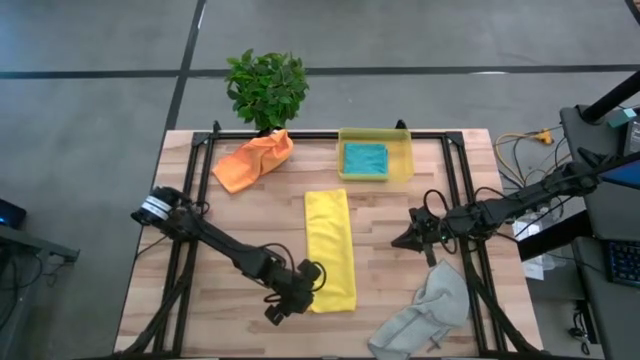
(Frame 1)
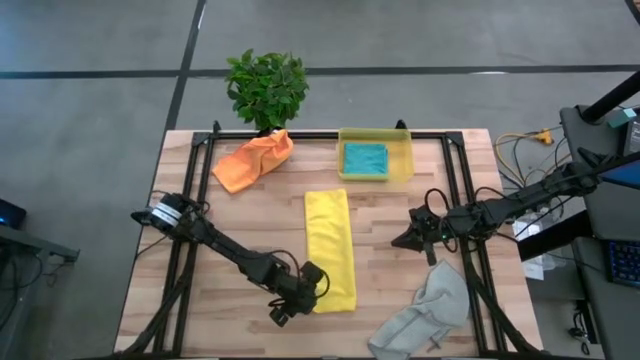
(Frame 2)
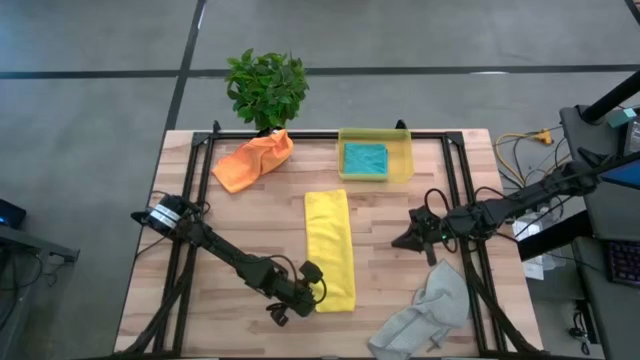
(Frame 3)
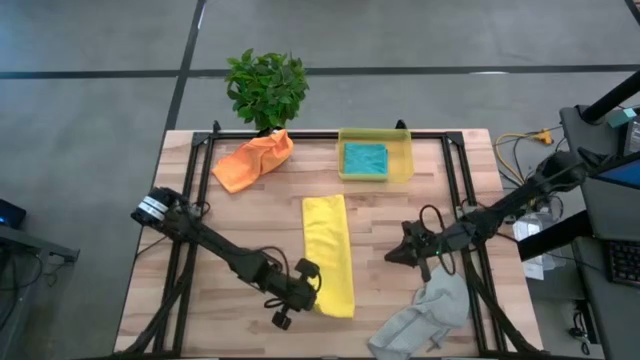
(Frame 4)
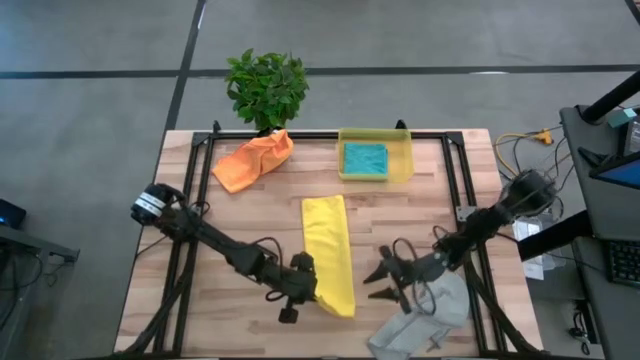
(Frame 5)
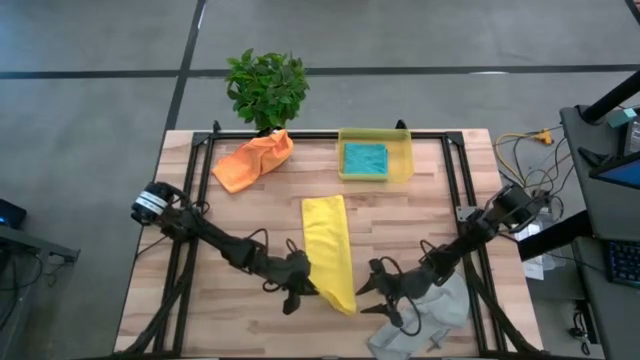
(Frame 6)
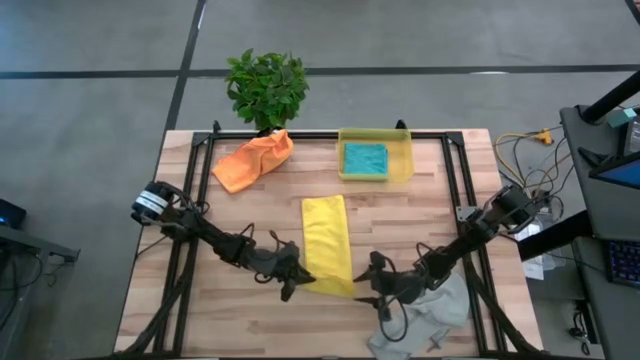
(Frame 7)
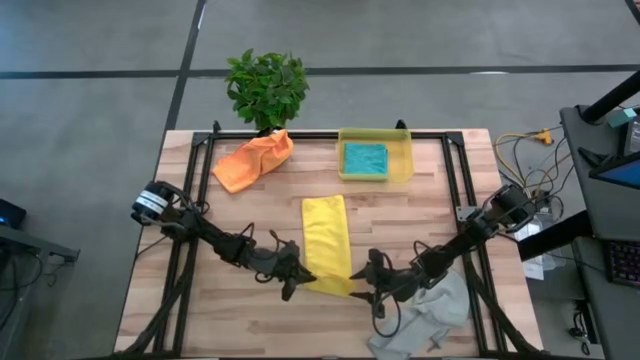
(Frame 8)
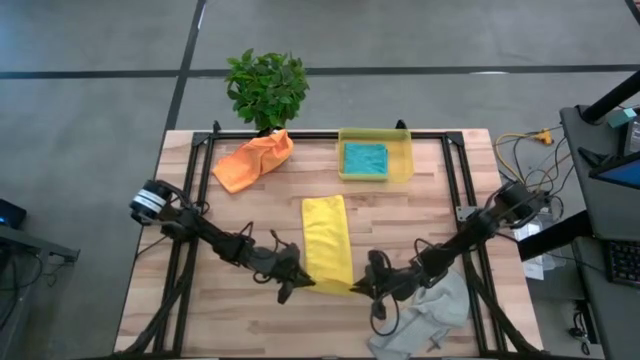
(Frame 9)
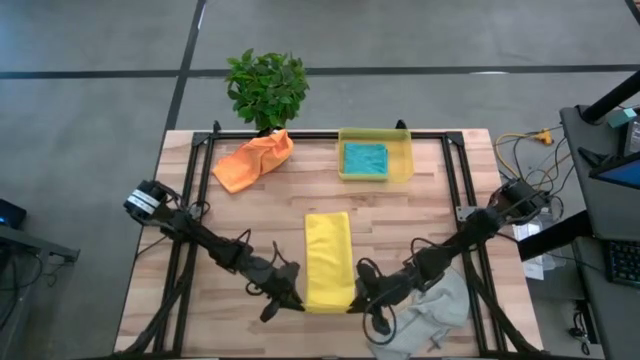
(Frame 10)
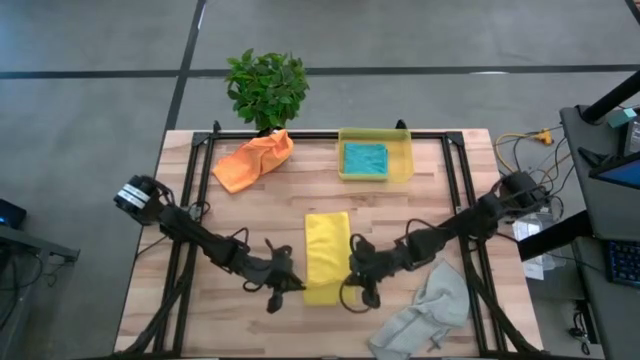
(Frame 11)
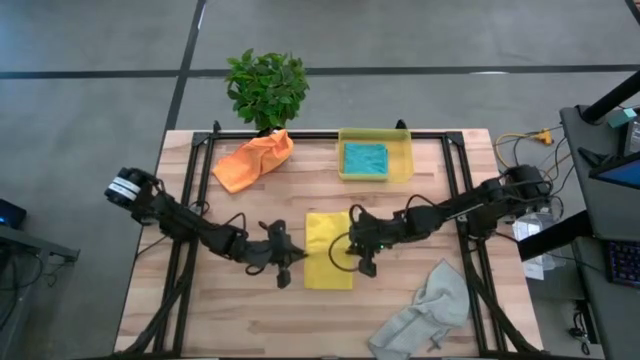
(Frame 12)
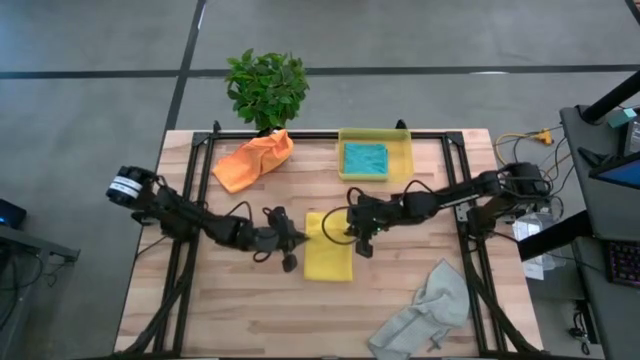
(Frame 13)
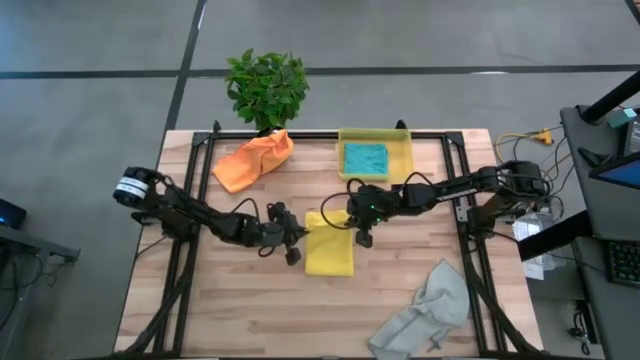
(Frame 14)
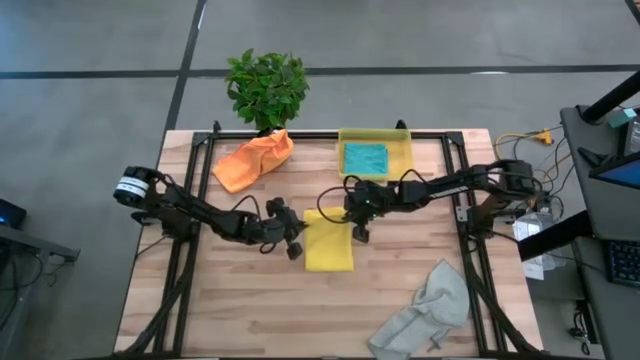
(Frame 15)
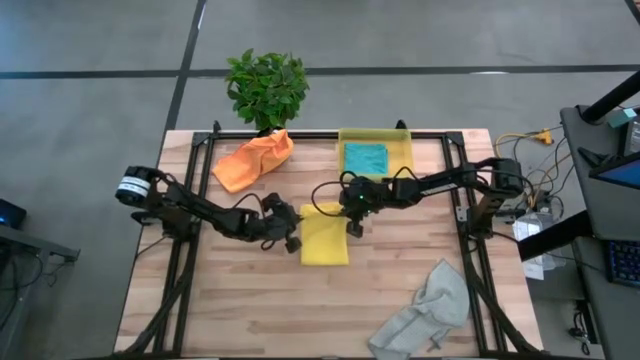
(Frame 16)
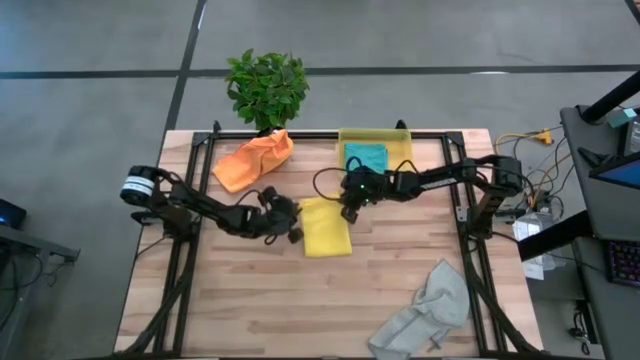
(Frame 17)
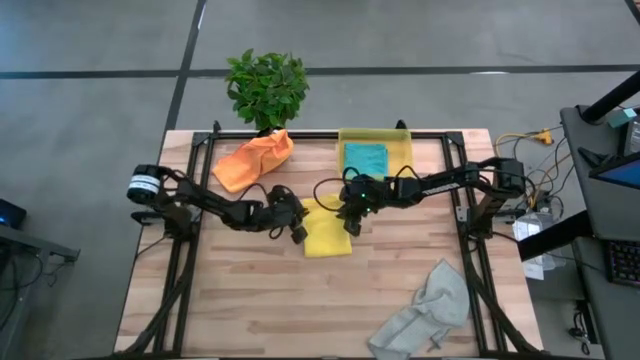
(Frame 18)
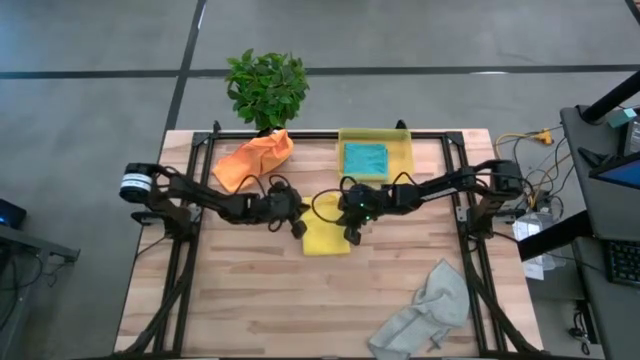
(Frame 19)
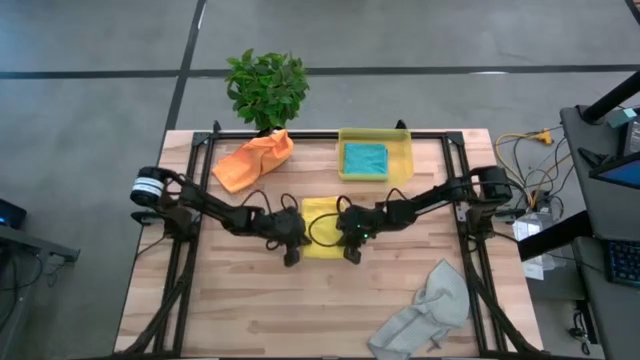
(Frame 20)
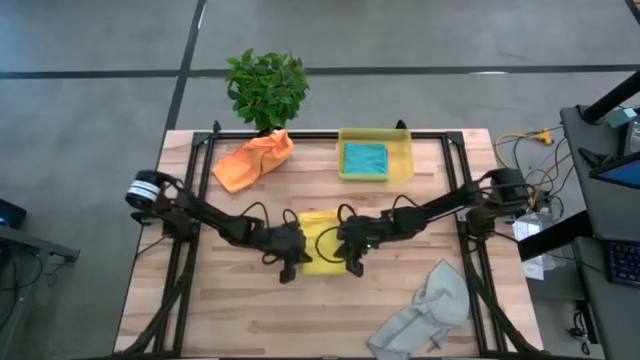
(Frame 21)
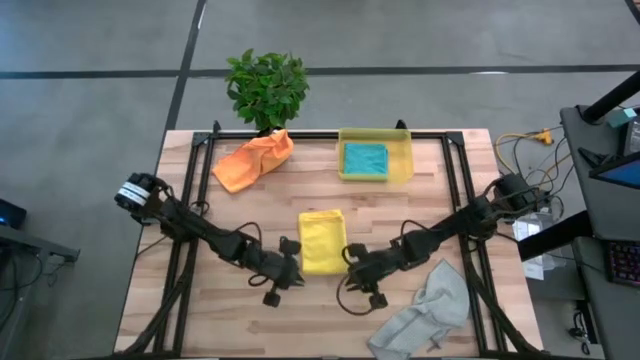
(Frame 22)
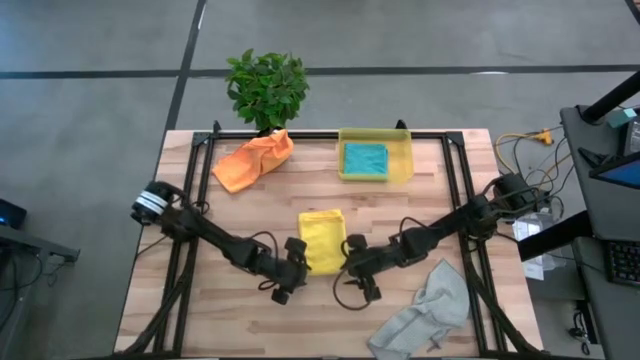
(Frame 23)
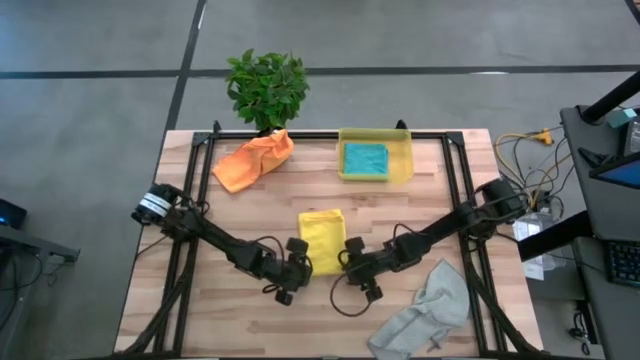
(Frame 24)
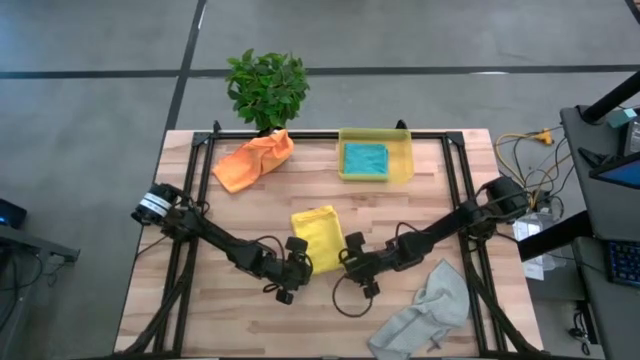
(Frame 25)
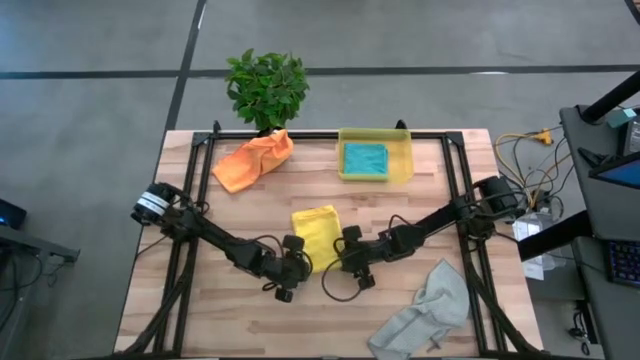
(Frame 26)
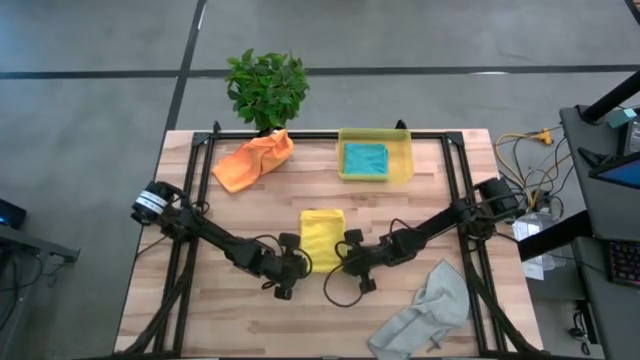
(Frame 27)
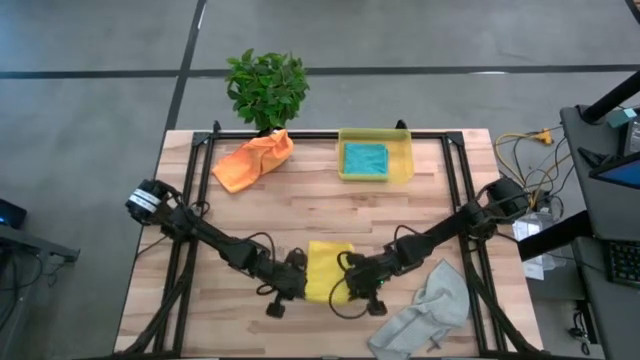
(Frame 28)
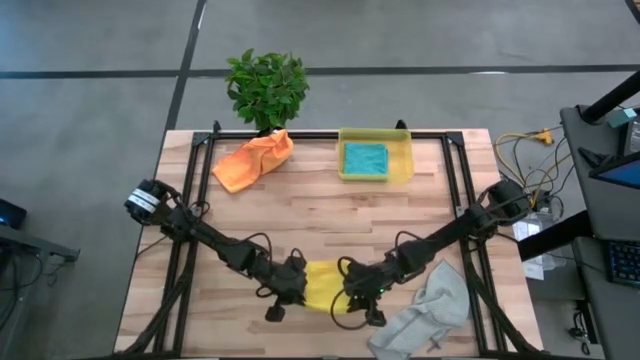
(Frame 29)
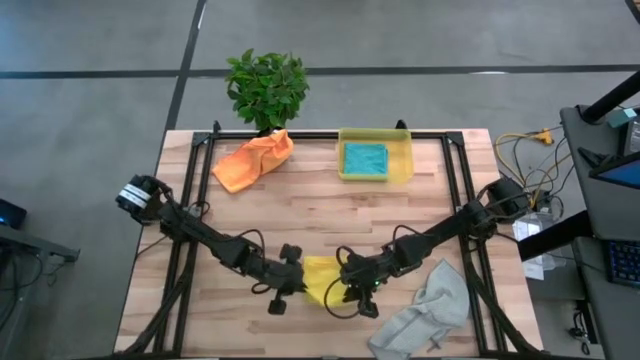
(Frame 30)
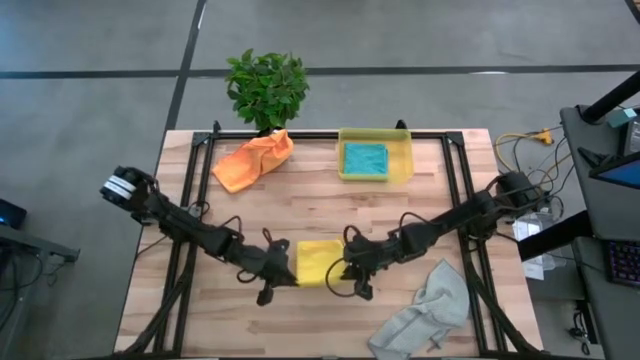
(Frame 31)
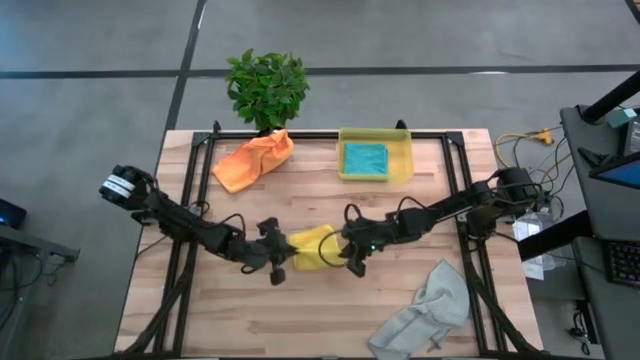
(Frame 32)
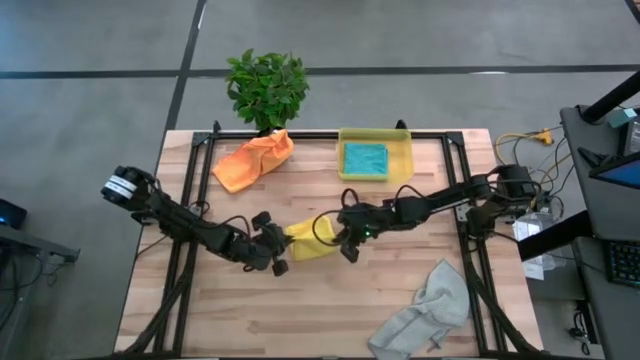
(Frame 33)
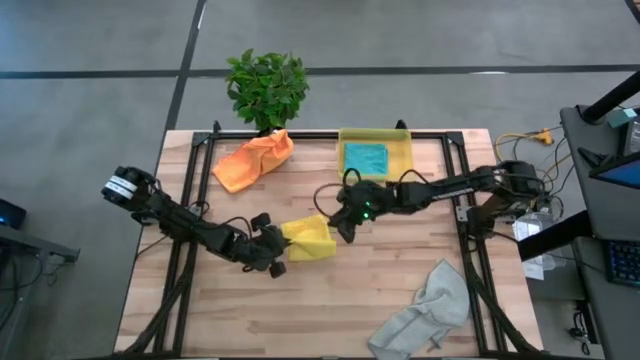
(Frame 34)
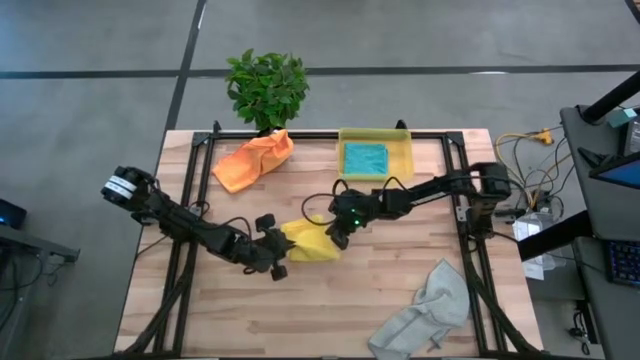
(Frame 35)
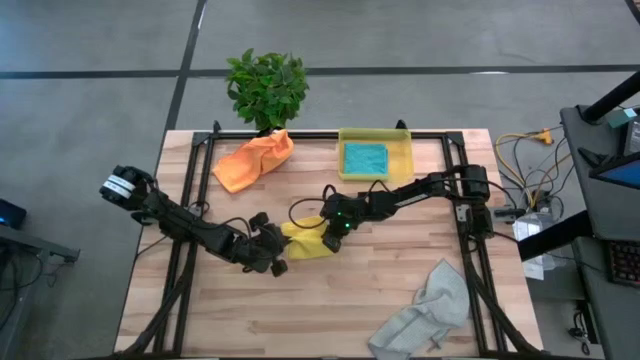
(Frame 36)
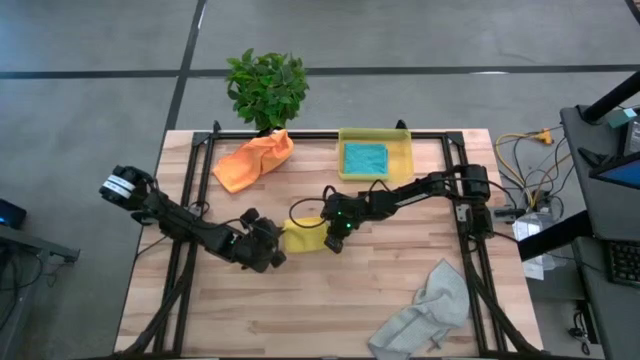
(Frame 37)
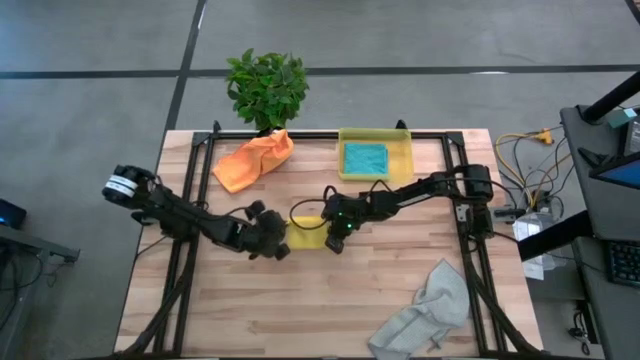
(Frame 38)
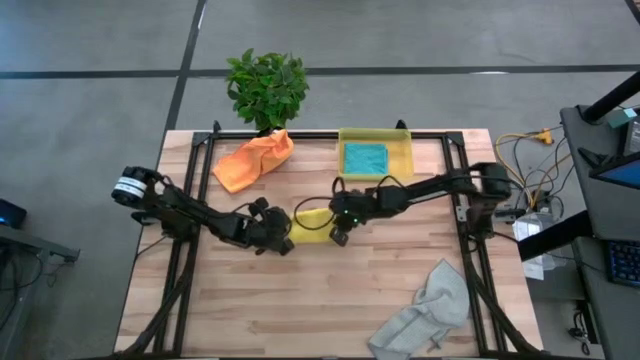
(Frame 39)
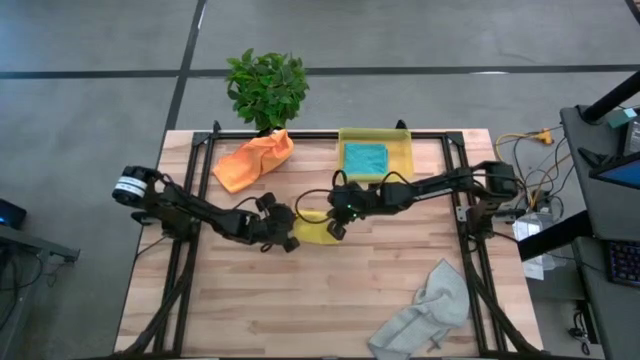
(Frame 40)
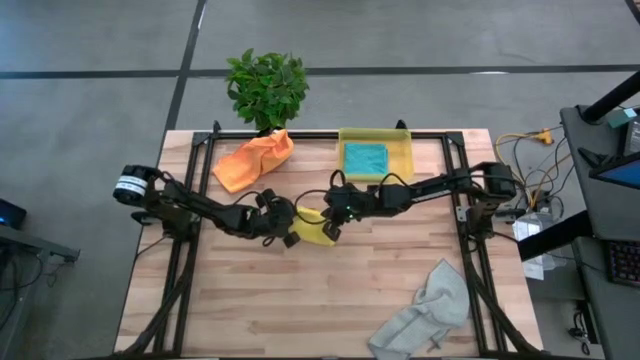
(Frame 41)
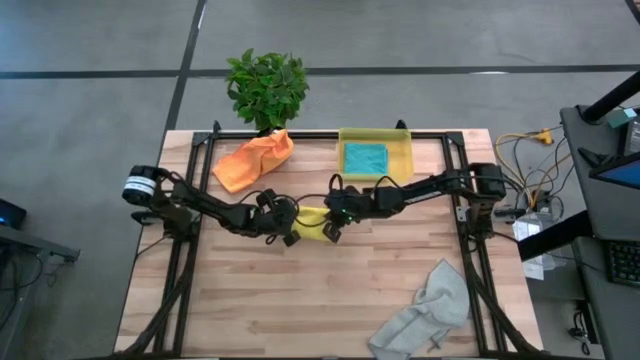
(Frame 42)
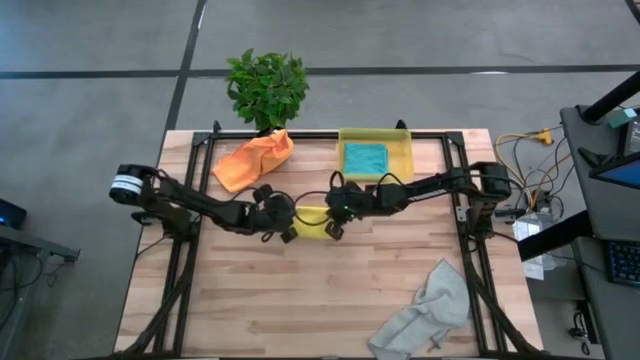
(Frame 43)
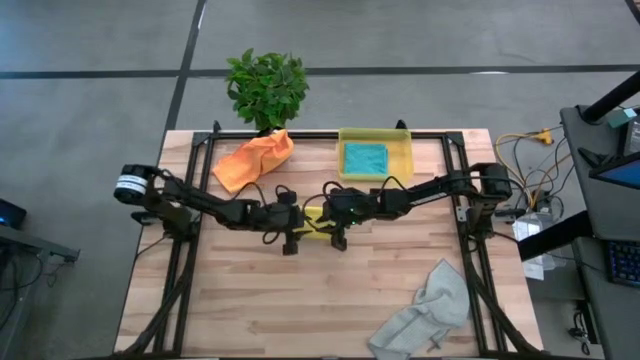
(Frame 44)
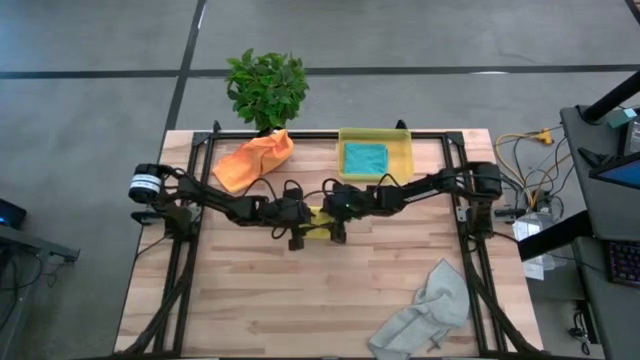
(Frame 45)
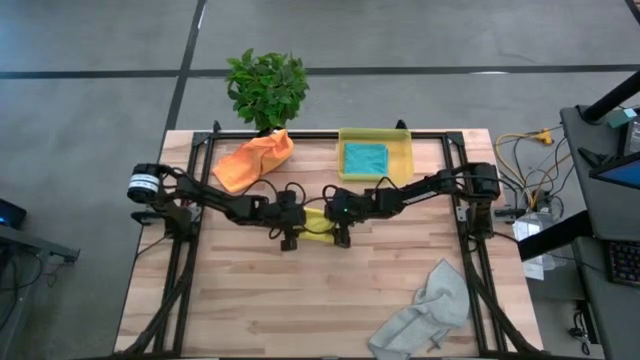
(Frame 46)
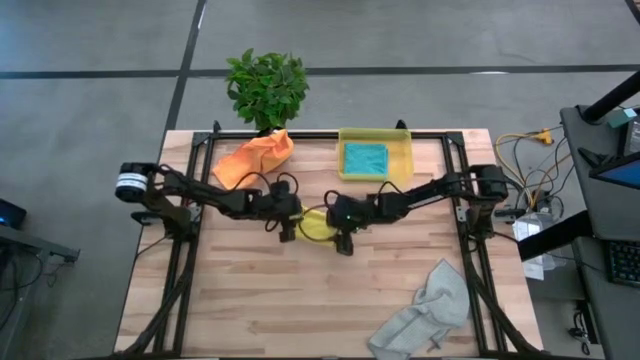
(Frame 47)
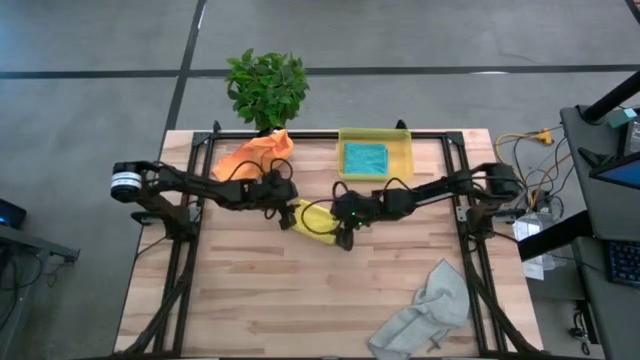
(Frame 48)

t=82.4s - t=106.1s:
Task: Fold microfiber towels
Fold the yellow microfiber towel
